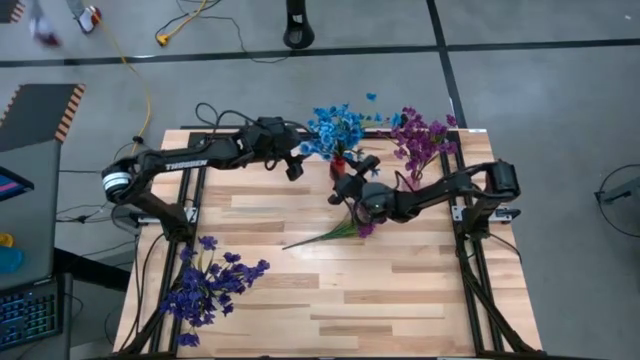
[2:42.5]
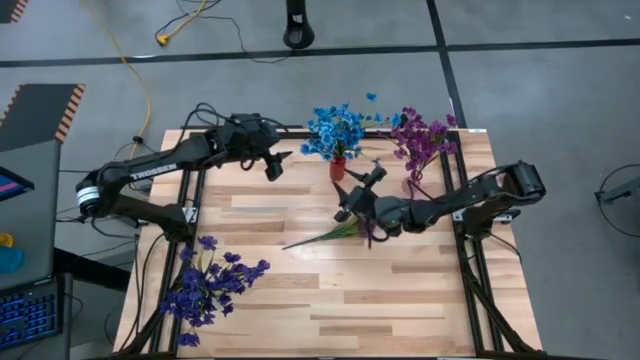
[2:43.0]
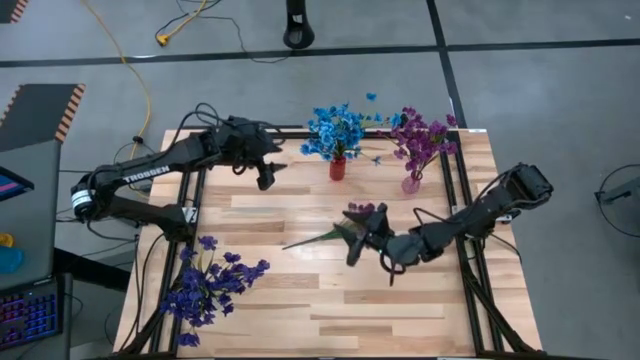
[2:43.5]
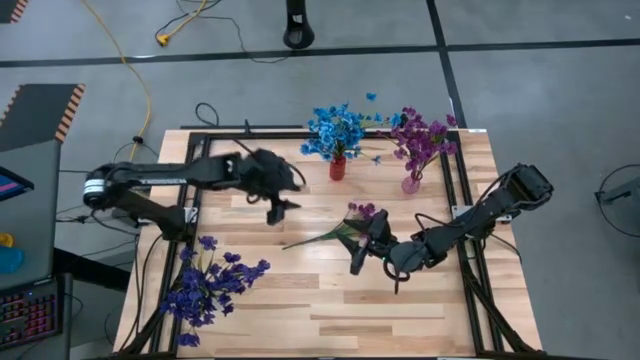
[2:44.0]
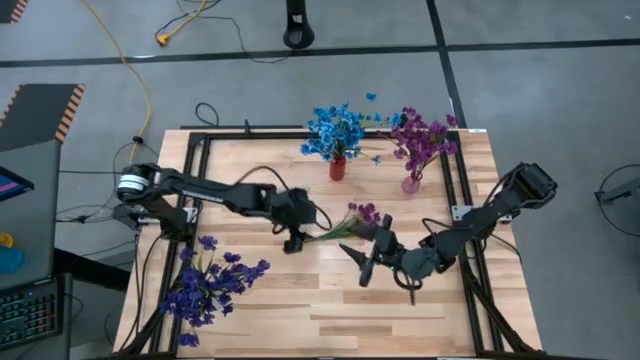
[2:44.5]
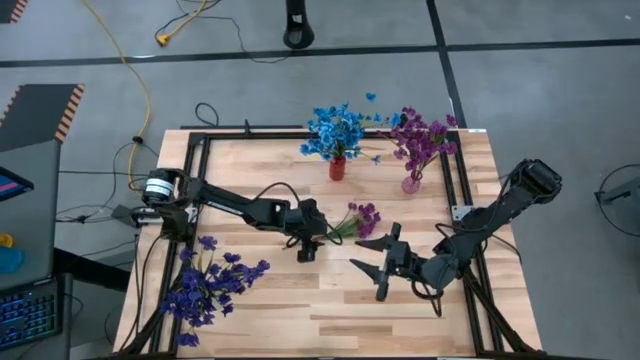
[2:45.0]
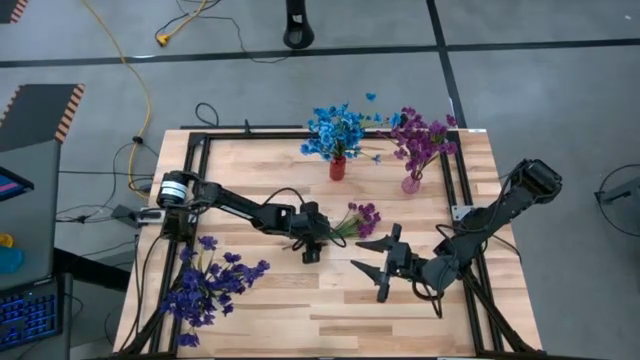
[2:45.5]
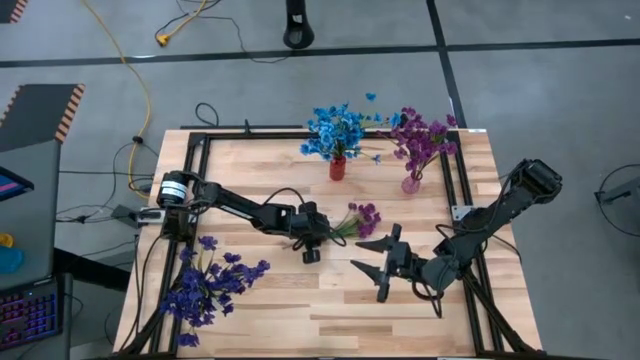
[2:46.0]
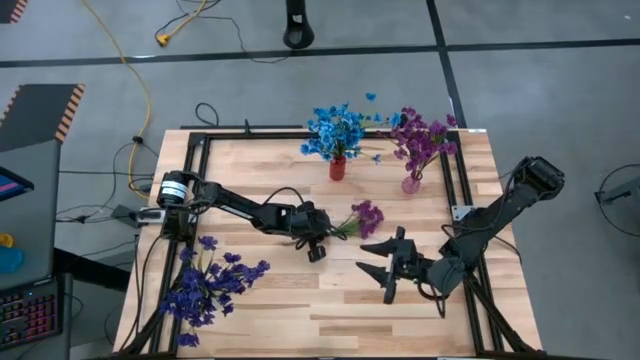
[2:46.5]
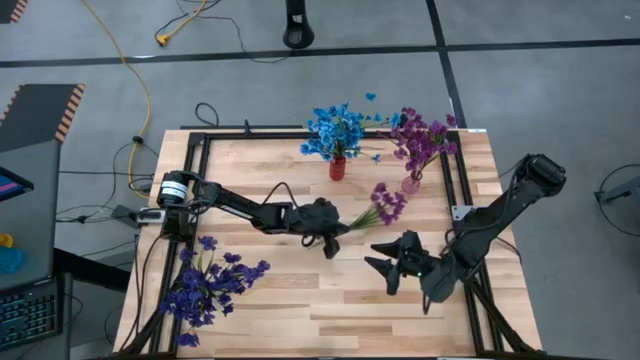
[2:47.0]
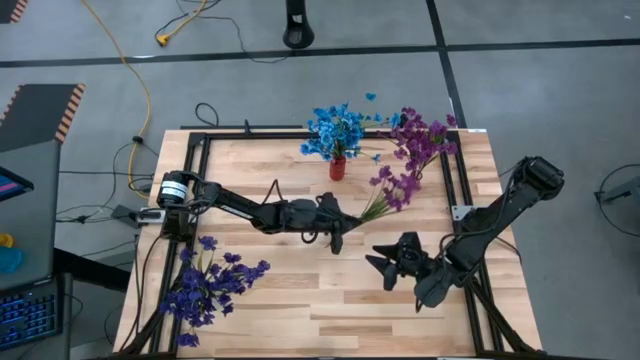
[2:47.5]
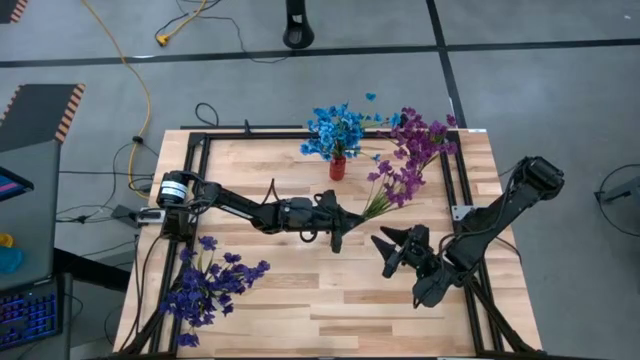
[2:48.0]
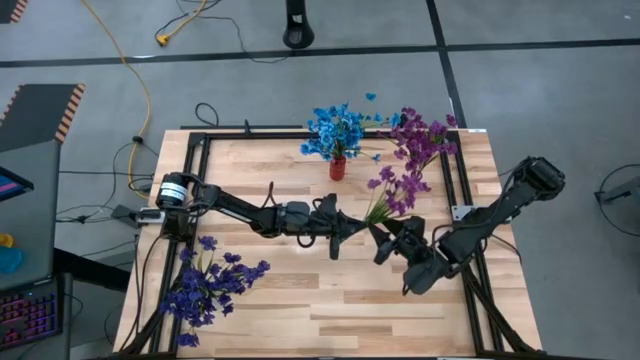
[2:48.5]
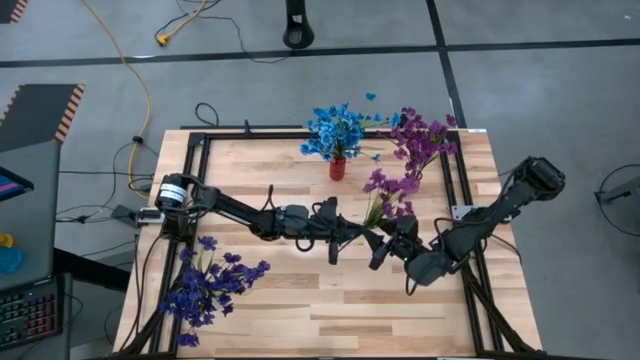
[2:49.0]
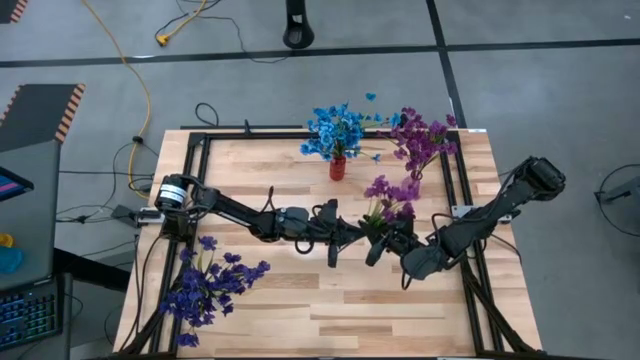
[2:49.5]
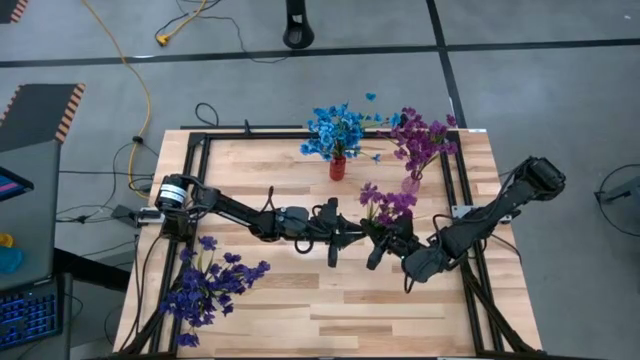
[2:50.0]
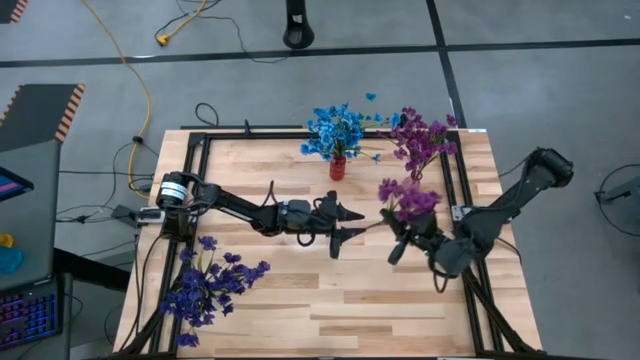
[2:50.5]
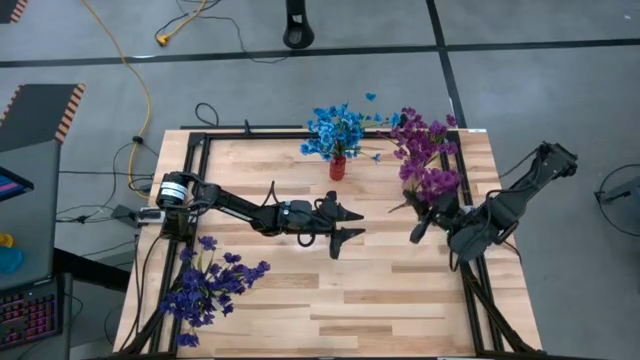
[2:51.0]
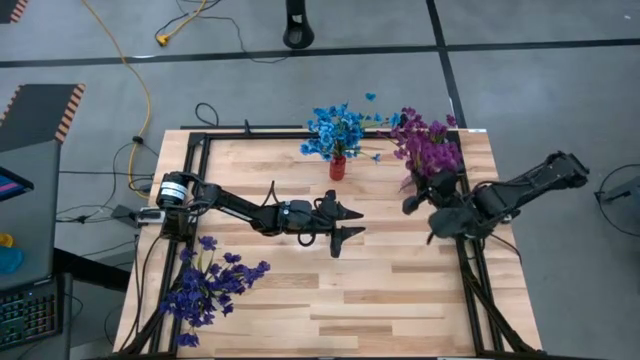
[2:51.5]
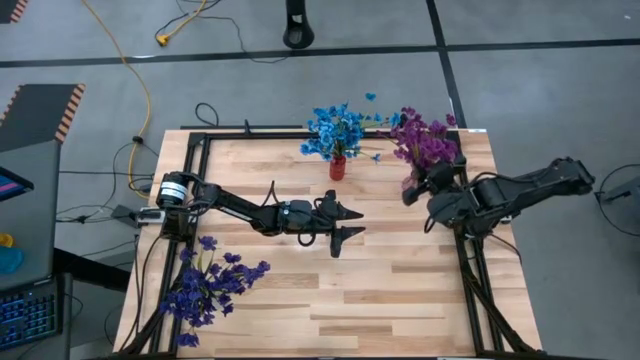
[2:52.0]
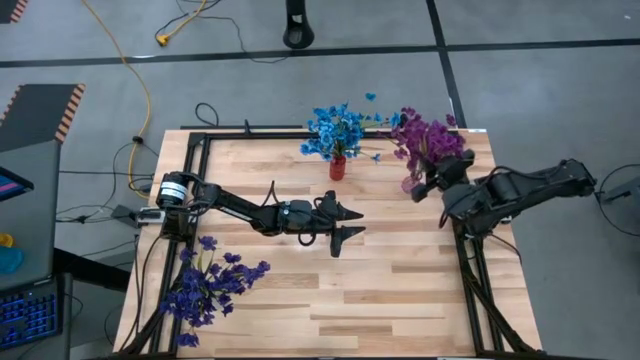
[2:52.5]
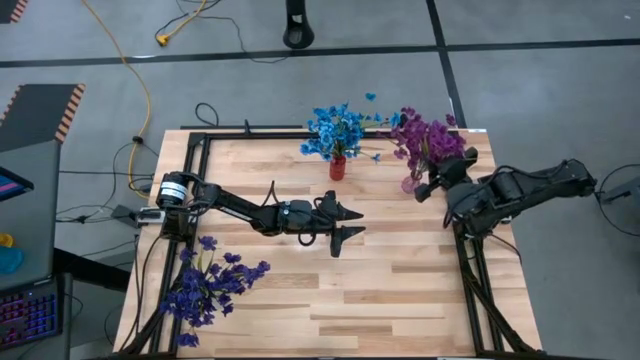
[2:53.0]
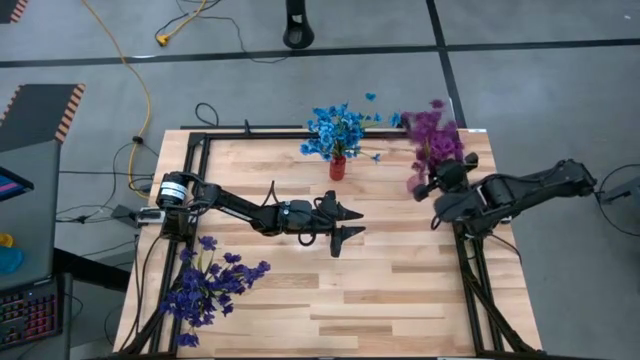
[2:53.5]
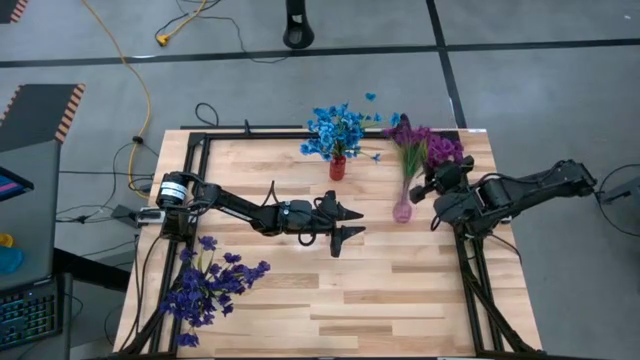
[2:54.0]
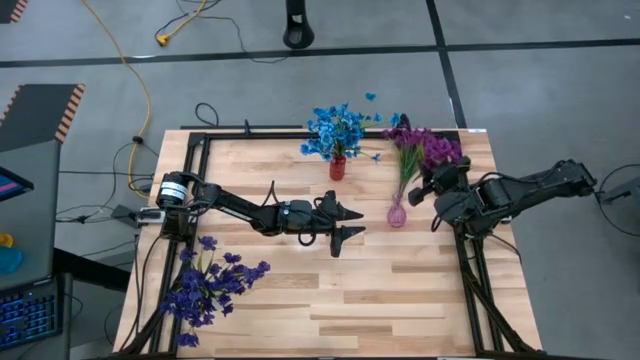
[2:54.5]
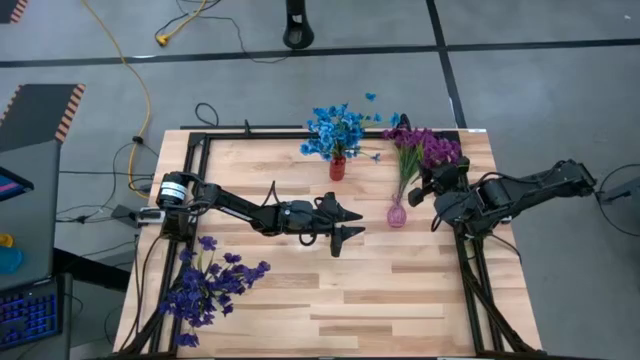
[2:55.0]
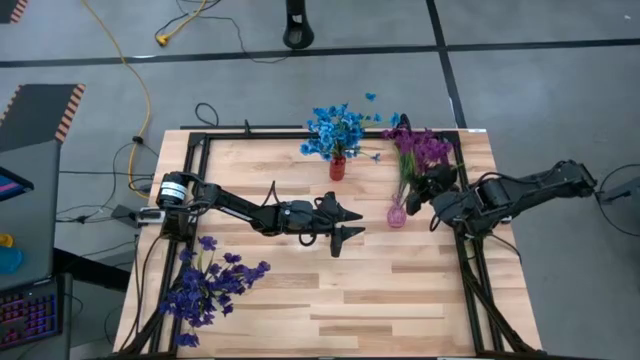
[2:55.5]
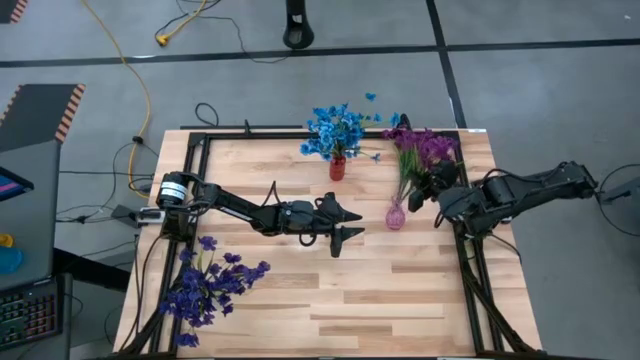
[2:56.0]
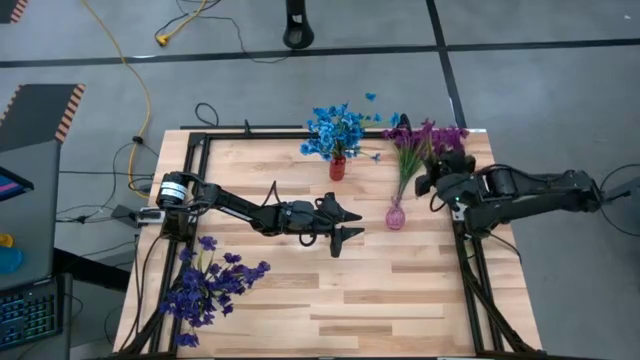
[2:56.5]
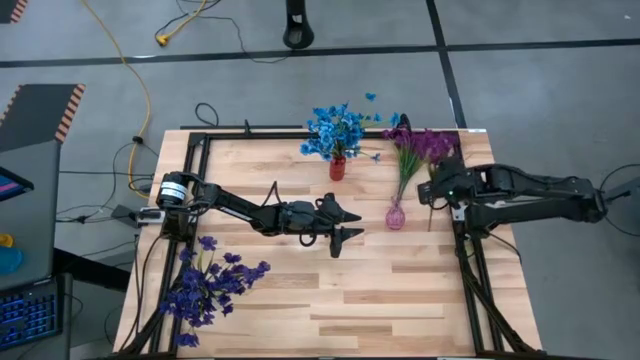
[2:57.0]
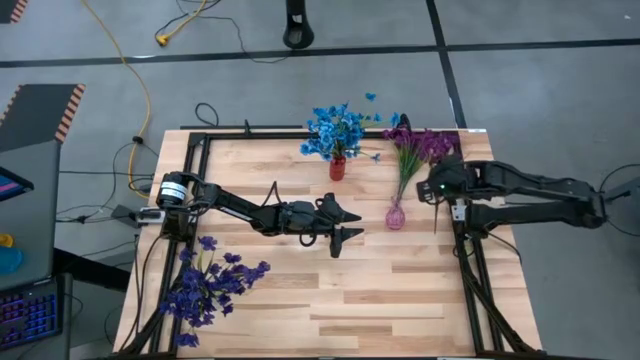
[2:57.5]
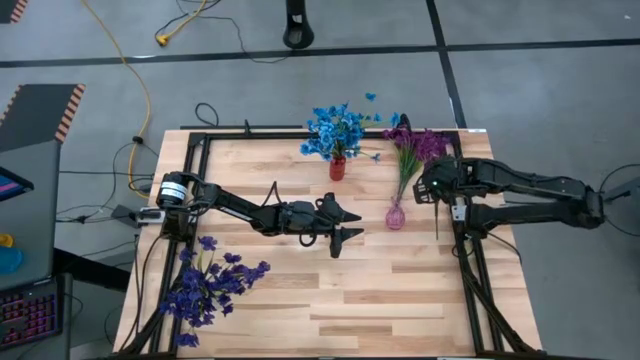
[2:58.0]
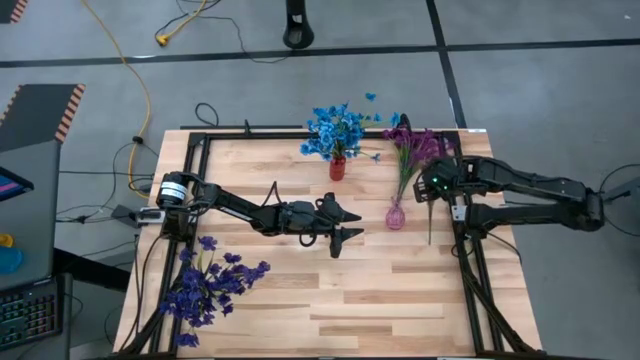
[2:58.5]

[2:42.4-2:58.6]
Task: Sort flowers into vase by color
Put the violet flowers into the violet vase

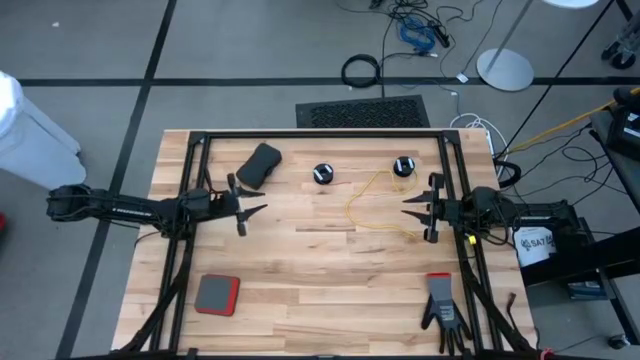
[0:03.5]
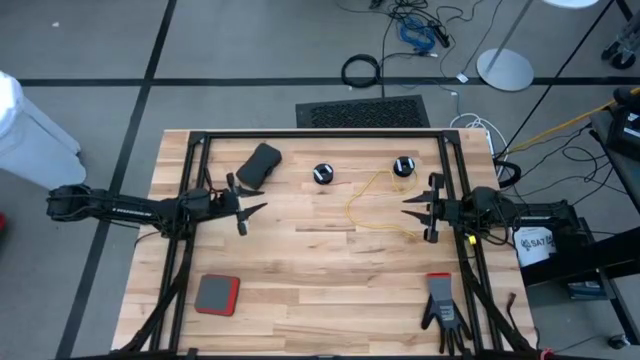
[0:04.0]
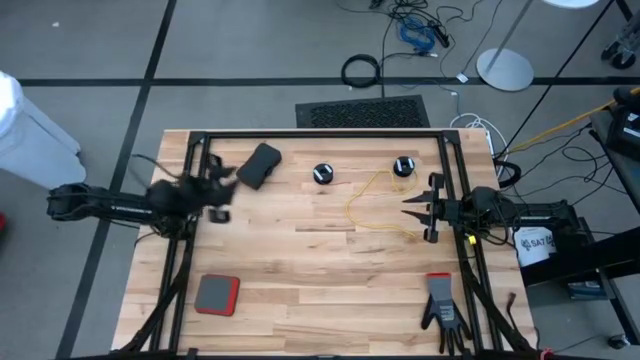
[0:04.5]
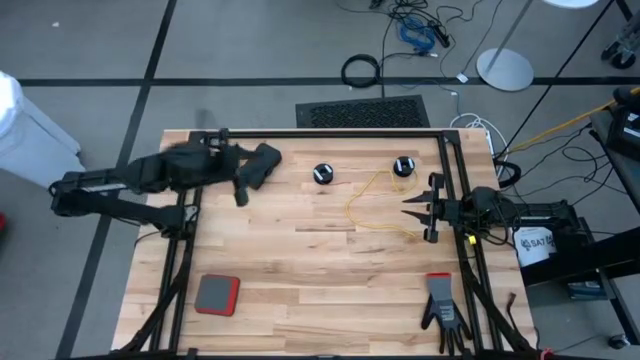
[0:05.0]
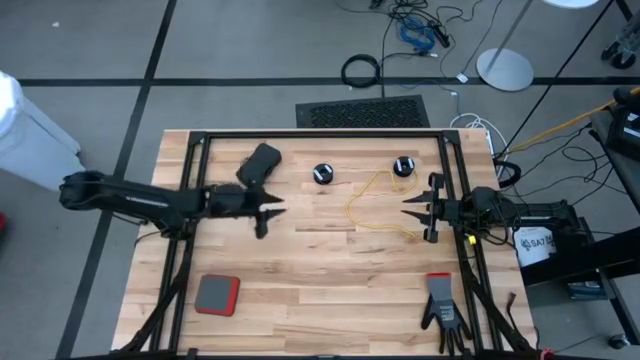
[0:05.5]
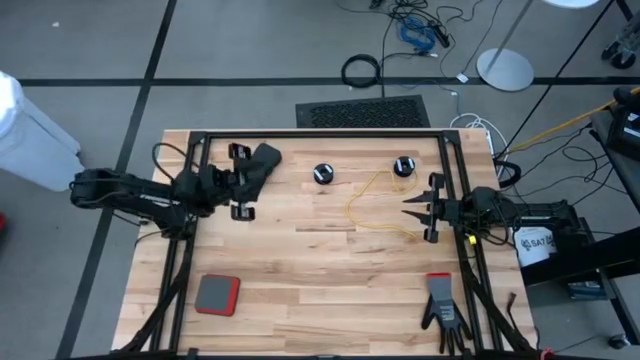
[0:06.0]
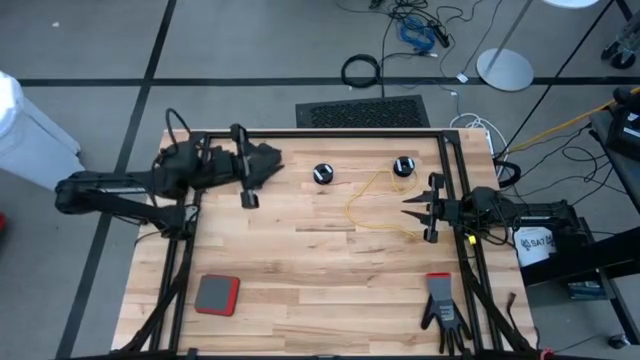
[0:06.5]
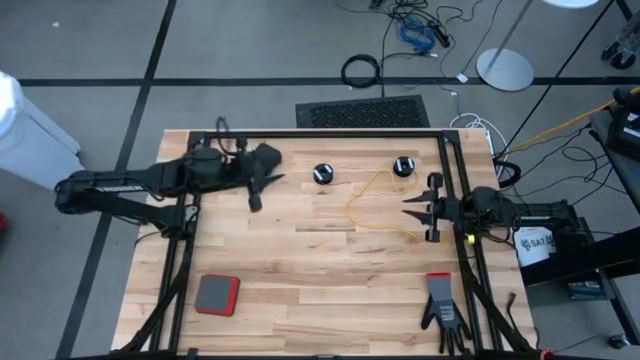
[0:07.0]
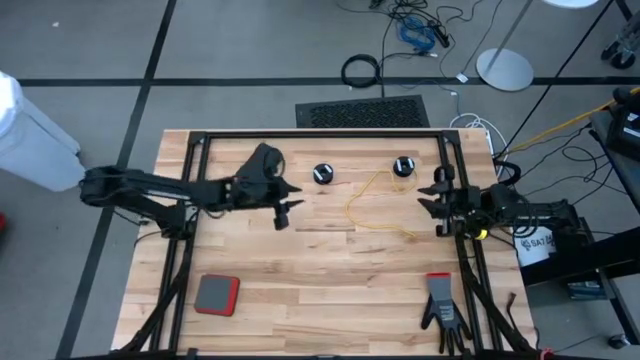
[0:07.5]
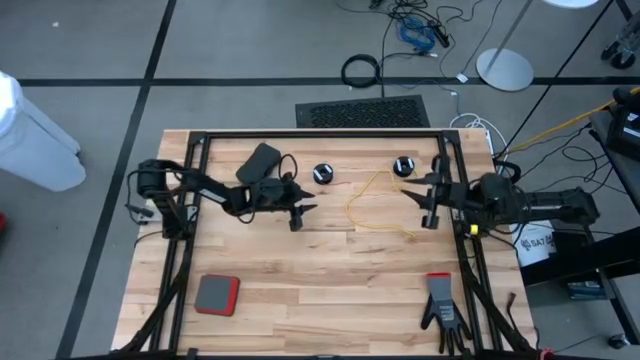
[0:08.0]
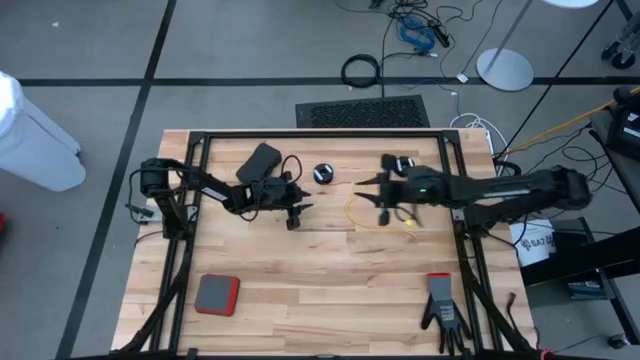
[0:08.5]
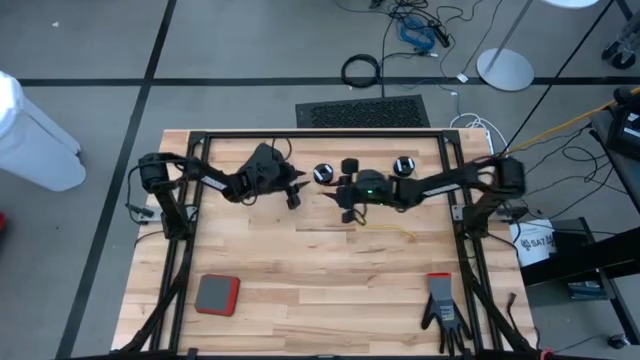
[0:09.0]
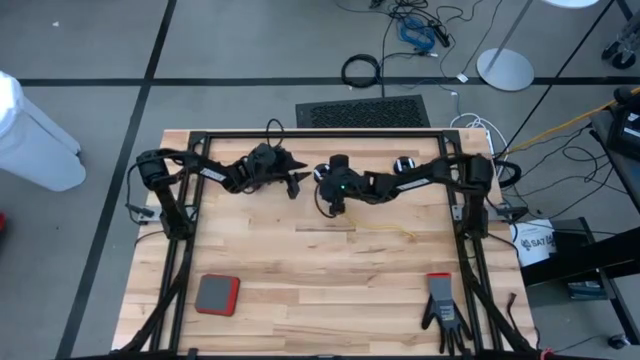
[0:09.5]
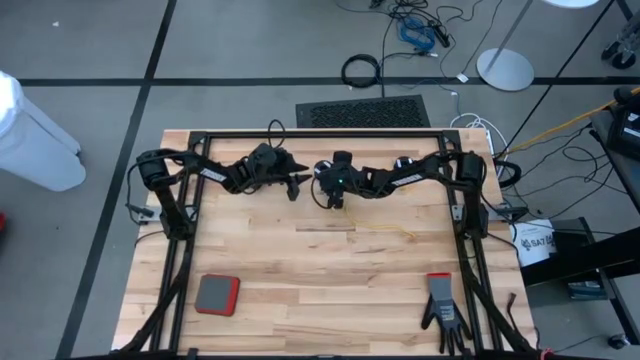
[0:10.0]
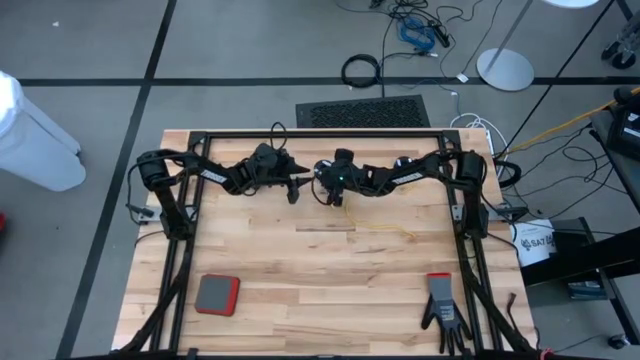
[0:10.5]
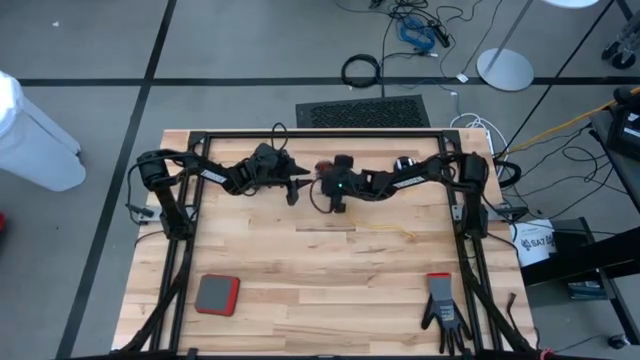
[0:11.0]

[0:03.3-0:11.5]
Task: Coil cords
Uncoil the red wire from the spool
